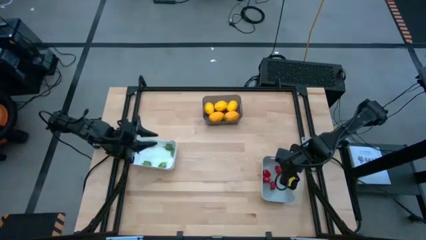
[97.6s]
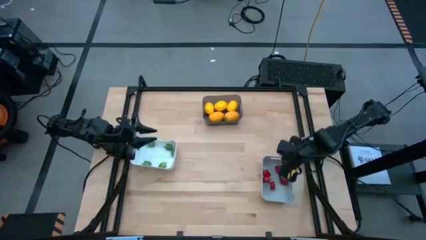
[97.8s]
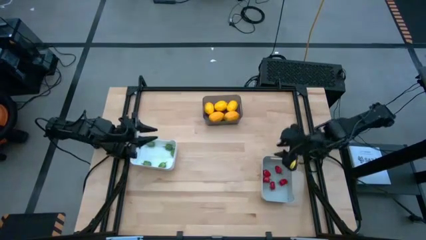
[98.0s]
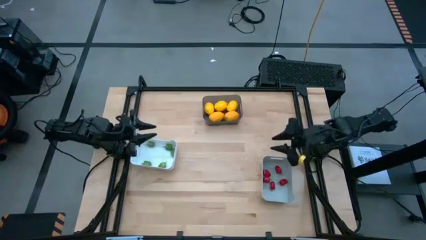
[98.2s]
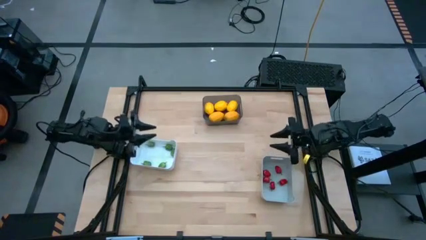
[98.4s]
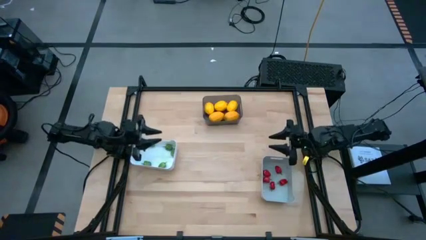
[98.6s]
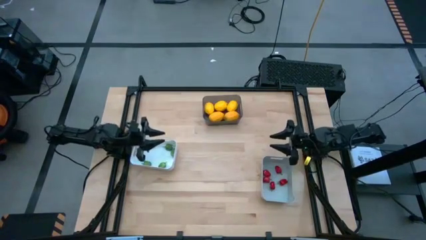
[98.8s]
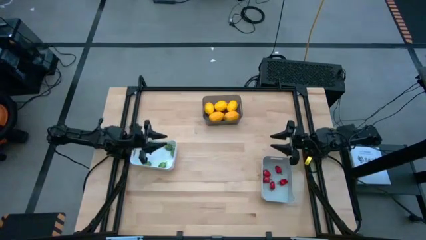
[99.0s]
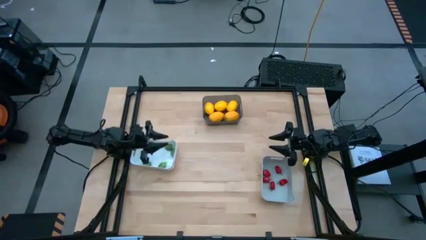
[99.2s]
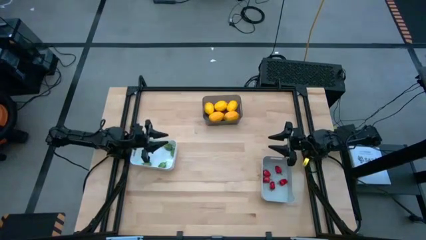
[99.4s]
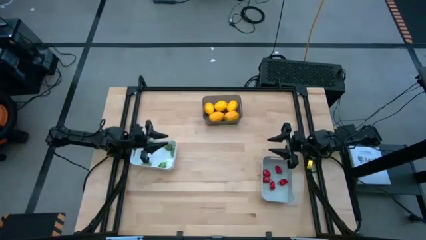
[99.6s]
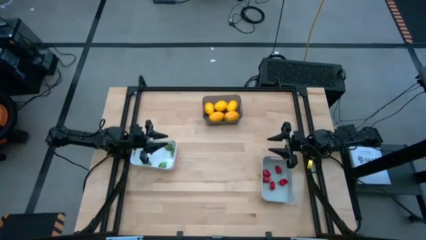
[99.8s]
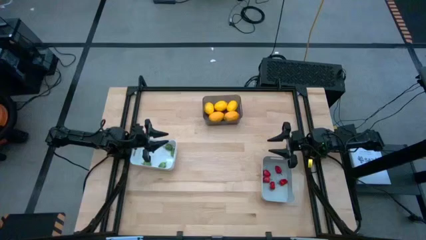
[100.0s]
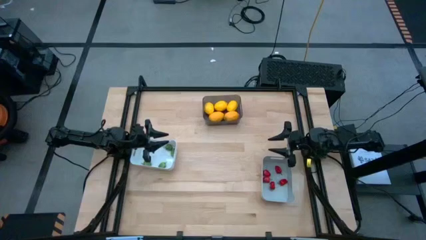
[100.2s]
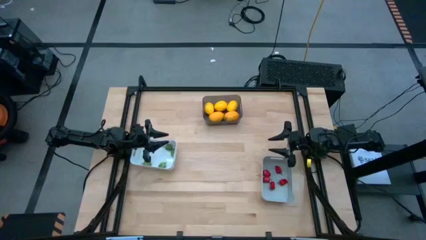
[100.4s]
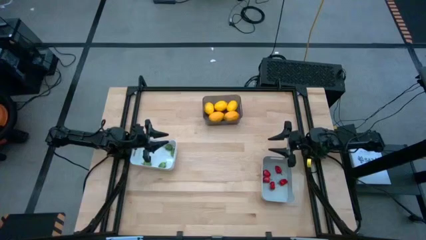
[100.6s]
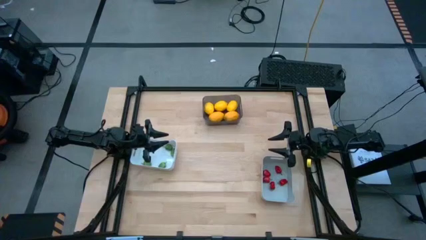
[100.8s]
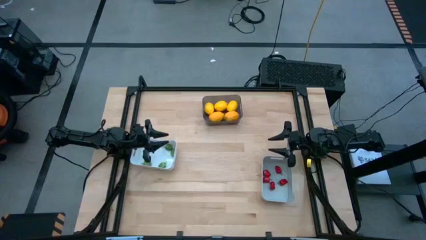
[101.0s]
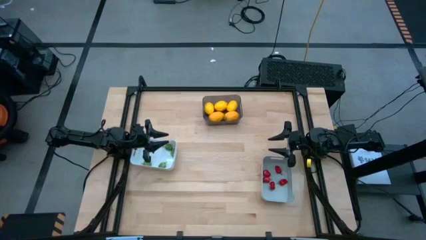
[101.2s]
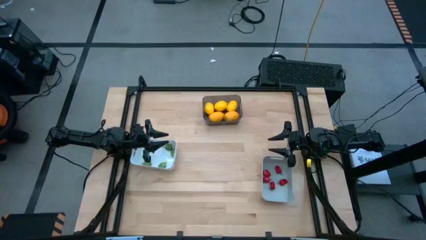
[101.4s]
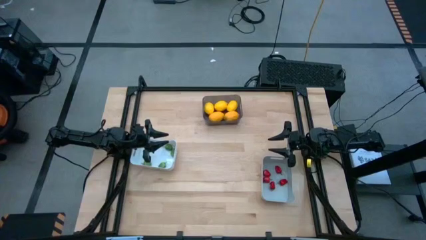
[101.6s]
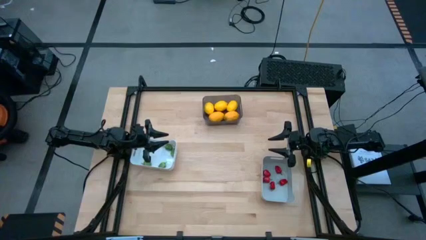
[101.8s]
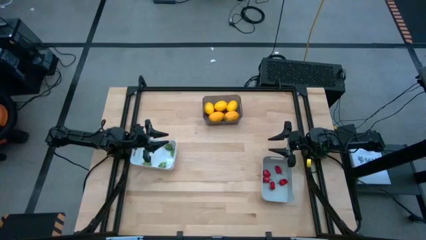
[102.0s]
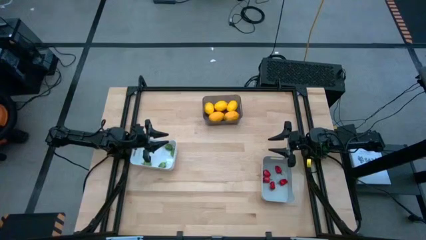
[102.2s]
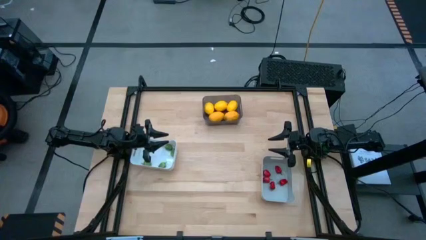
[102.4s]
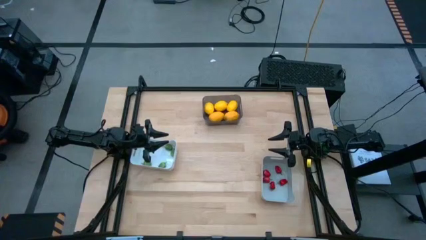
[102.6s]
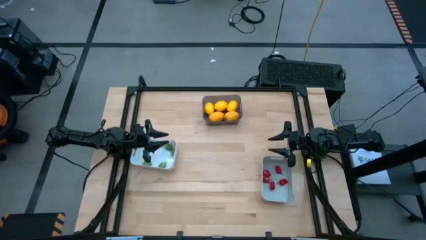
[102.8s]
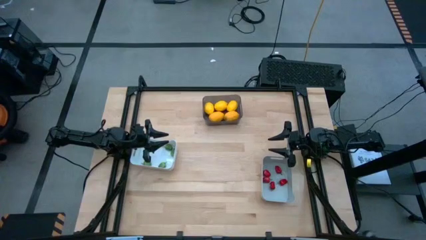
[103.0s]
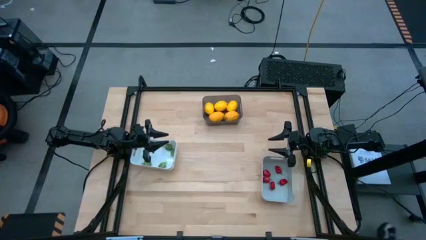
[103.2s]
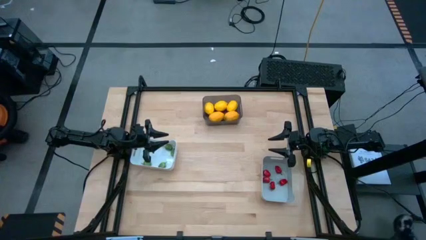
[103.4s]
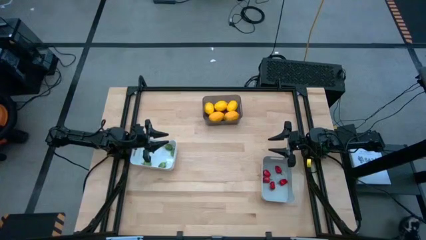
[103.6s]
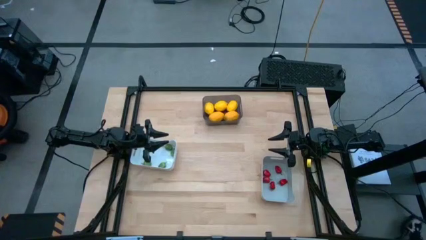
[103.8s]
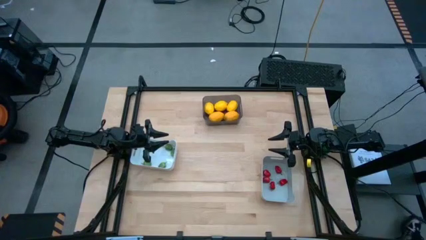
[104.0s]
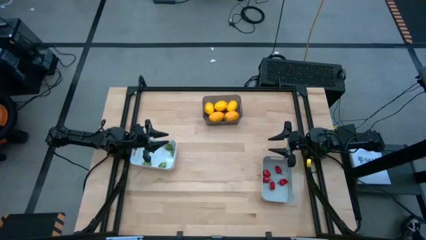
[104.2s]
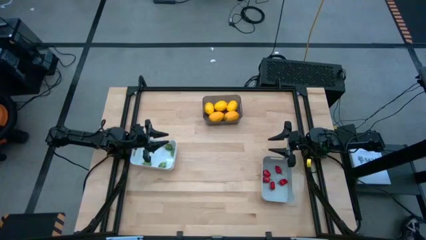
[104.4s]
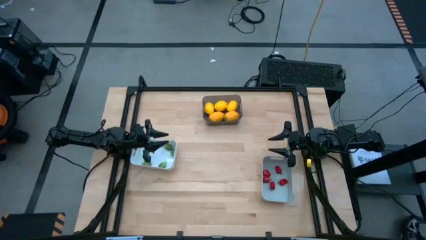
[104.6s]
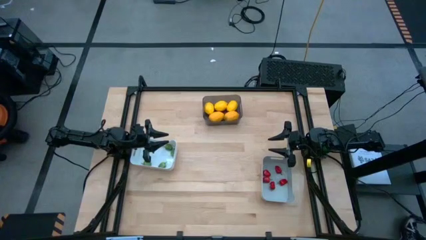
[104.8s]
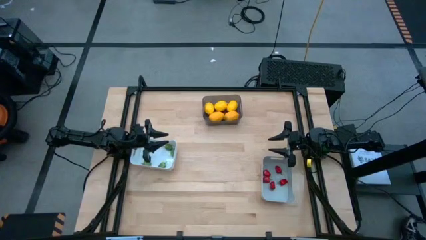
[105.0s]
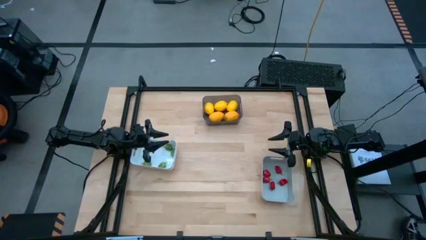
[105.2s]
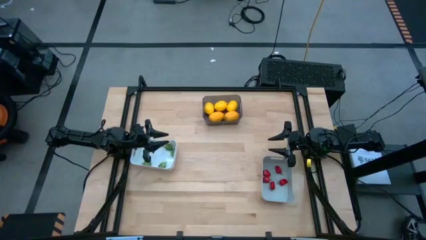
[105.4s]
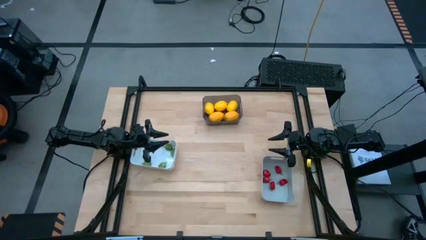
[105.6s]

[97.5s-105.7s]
Task: Sort produce into baskets
Return to Home Position

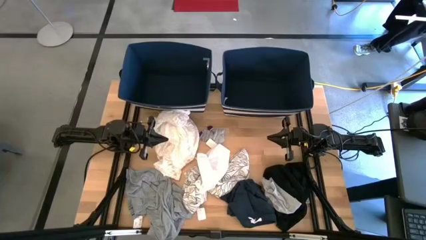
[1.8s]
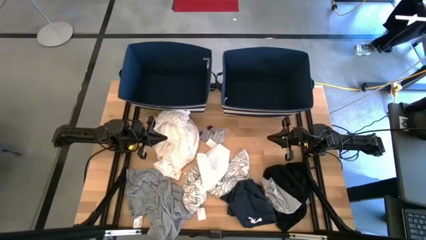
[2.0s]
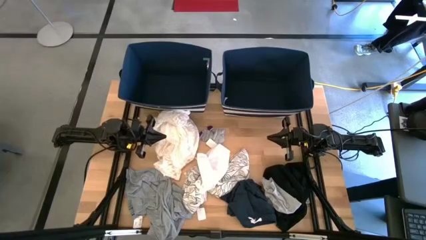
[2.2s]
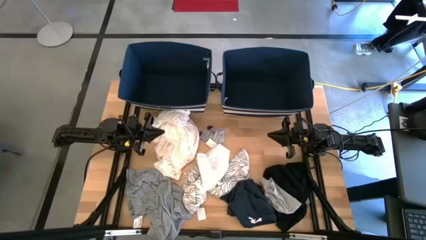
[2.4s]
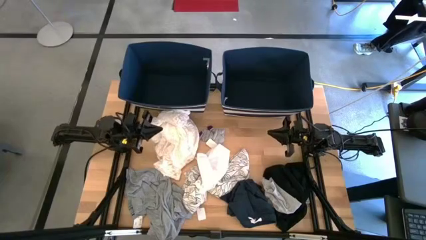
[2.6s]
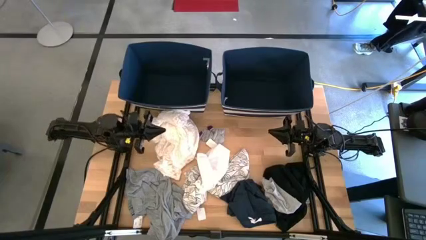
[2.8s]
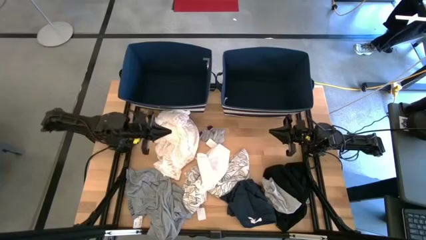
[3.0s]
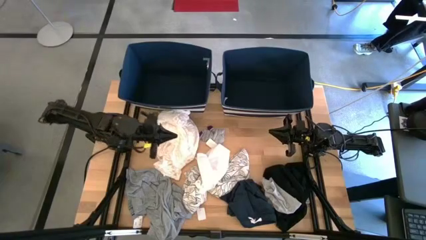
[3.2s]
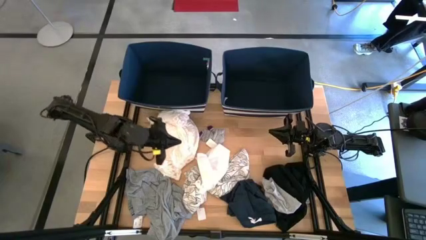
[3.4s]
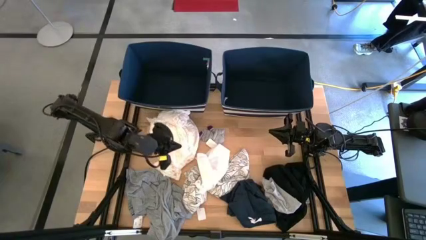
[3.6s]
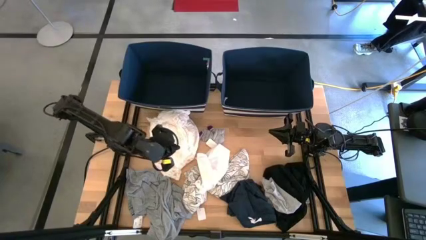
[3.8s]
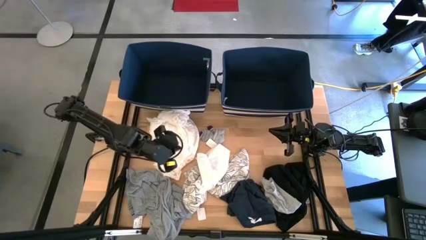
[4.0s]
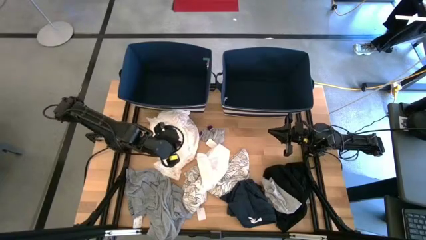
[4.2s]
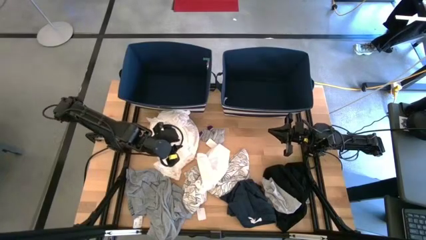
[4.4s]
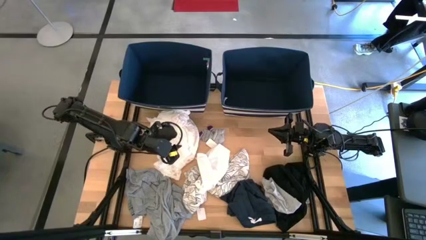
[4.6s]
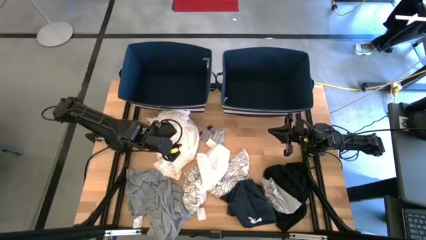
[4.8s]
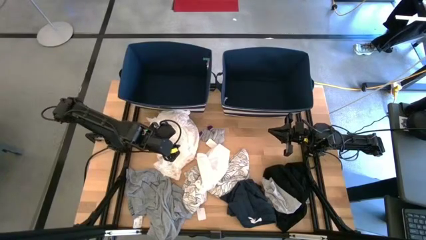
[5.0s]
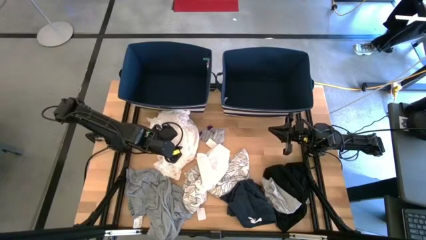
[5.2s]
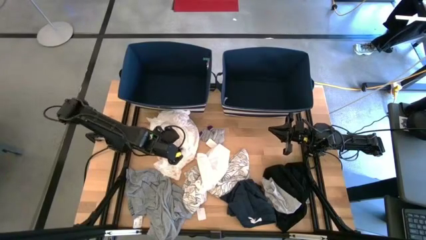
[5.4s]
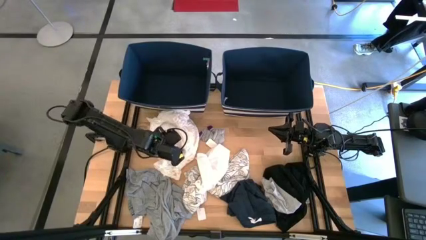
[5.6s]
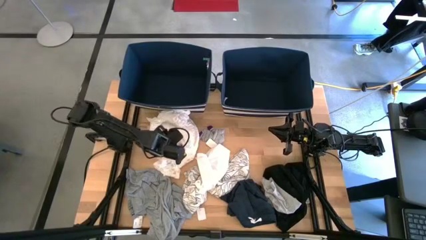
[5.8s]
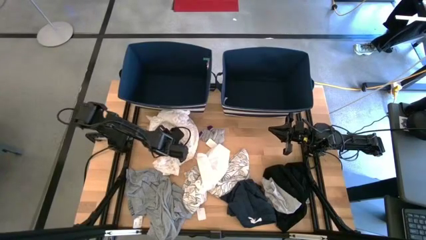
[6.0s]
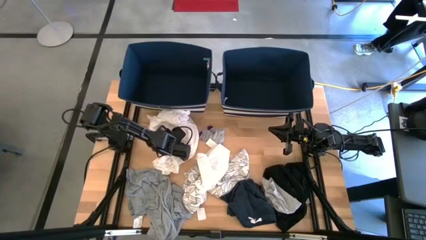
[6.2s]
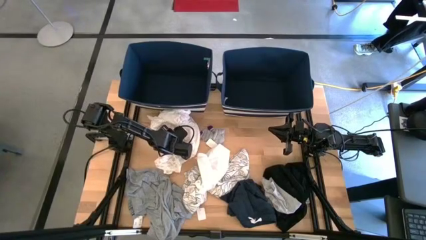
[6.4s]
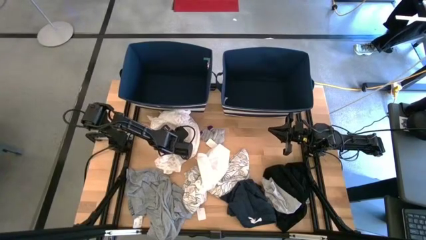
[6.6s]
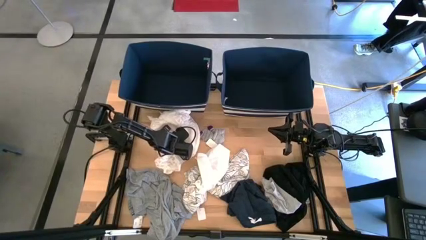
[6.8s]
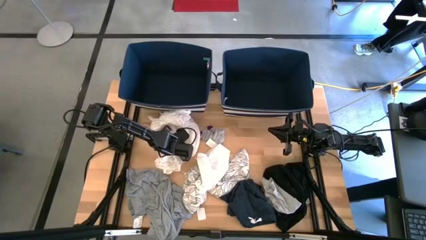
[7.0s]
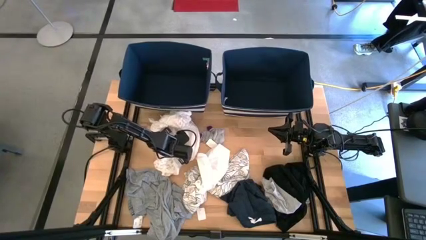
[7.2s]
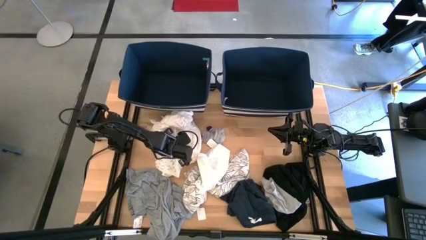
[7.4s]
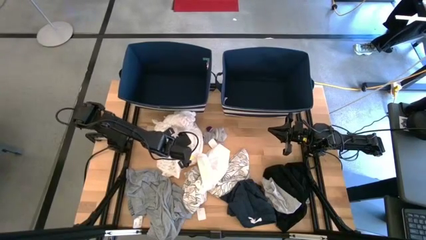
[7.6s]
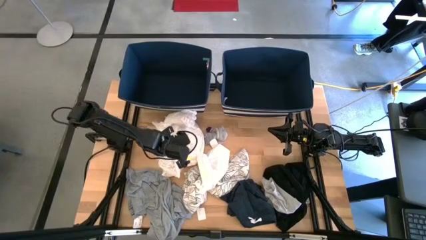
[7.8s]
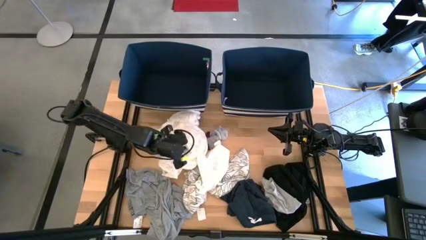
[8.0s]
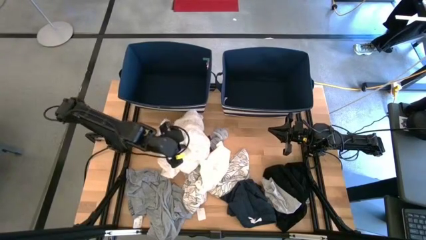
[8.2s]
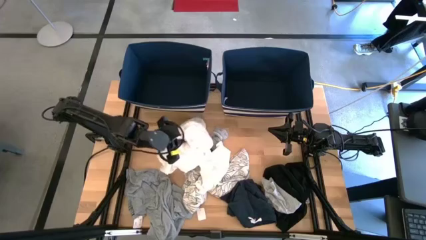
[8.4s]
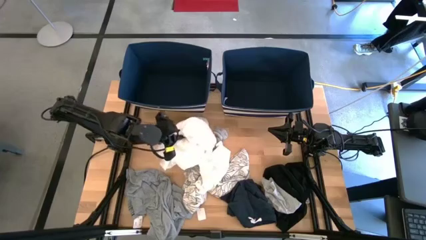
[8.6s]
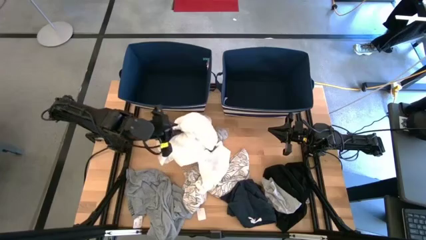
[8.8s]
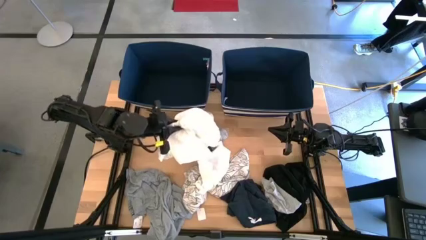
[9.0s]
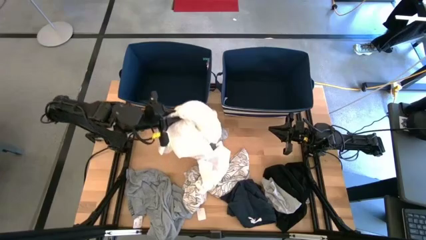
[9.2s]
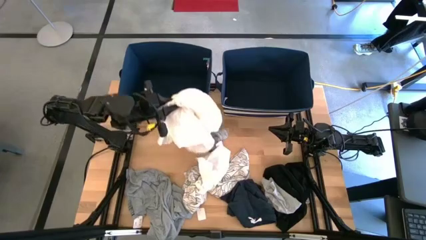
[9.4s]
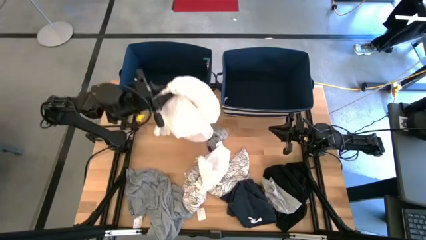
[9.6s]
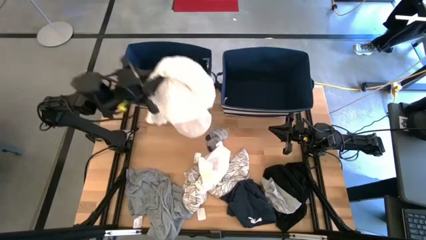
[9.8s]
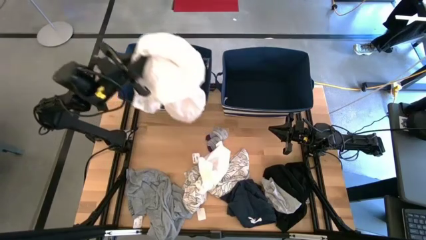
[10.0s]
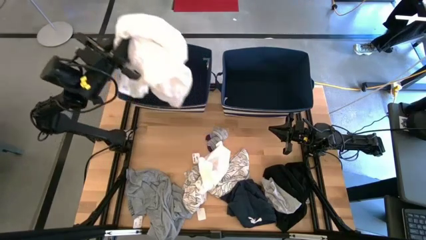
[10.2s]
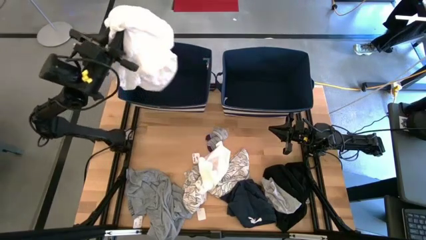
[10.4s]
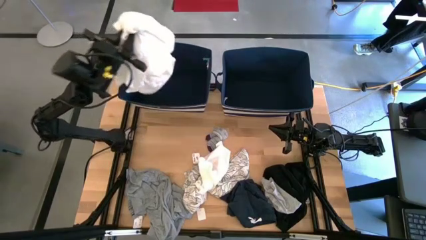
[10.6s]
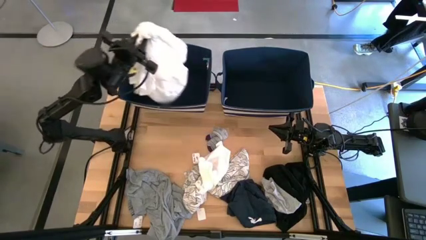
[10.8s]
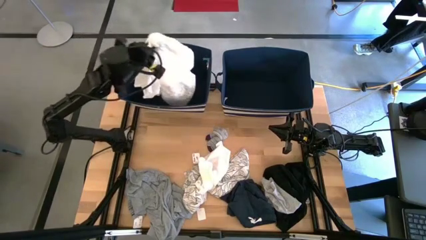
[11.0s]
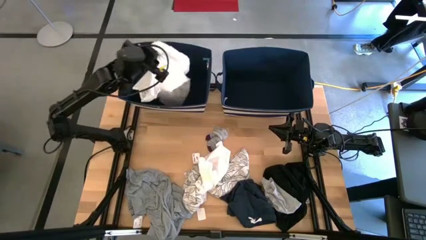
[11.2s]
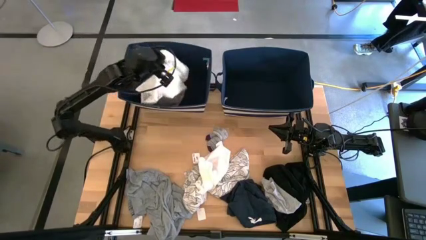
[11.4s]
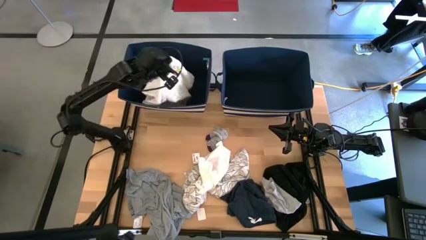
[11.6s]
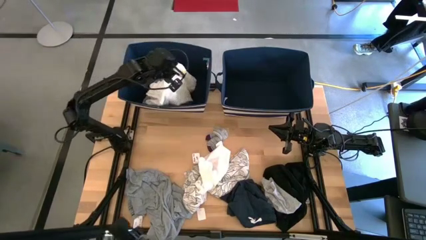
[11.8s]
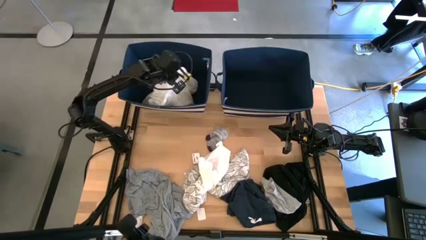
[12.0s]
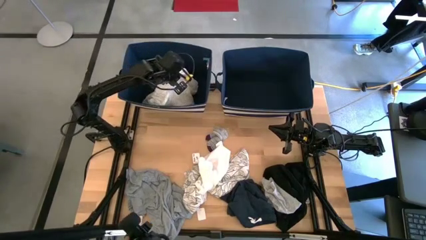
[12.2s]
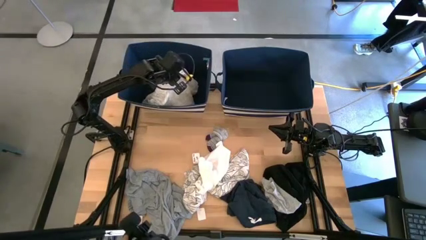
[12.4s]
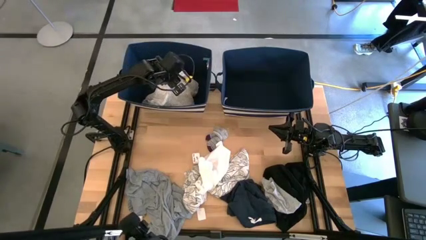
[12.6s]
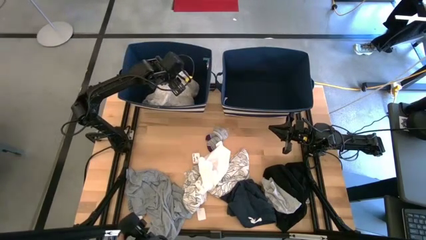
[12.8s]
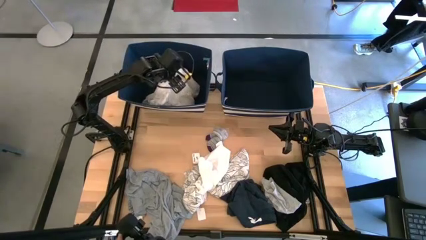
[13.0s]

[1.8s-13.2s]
Task: Sort clothes
Put the white dress into the right laundry organizer
